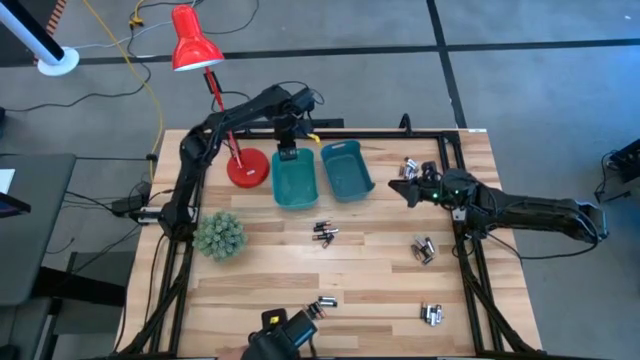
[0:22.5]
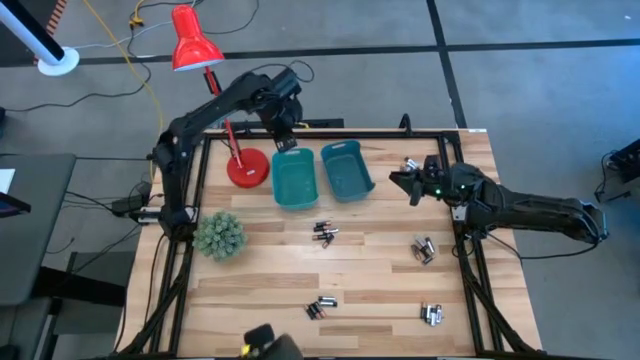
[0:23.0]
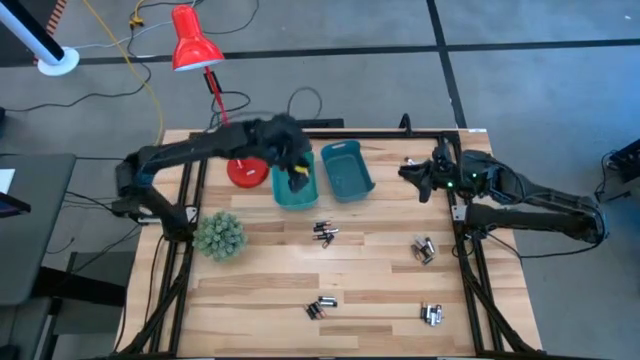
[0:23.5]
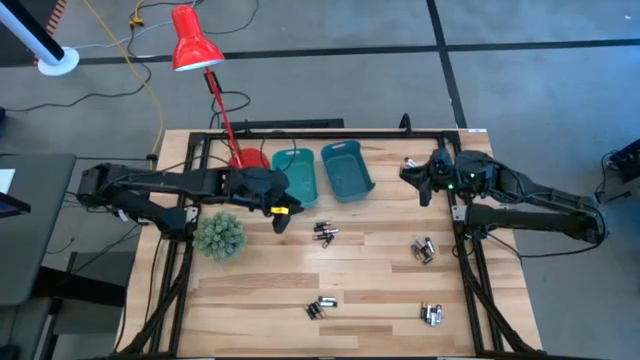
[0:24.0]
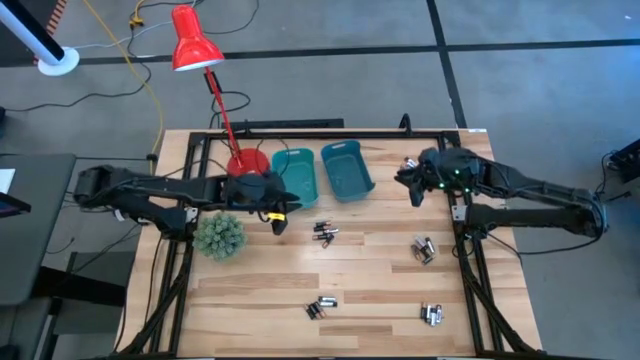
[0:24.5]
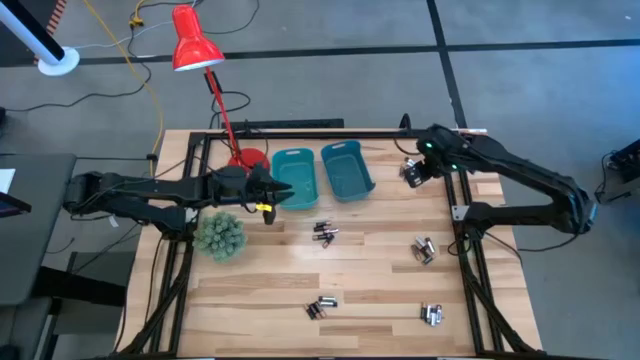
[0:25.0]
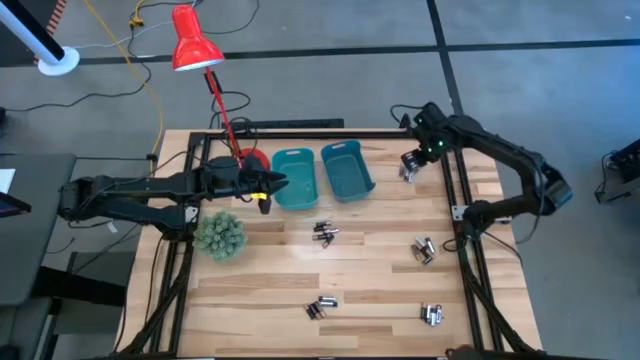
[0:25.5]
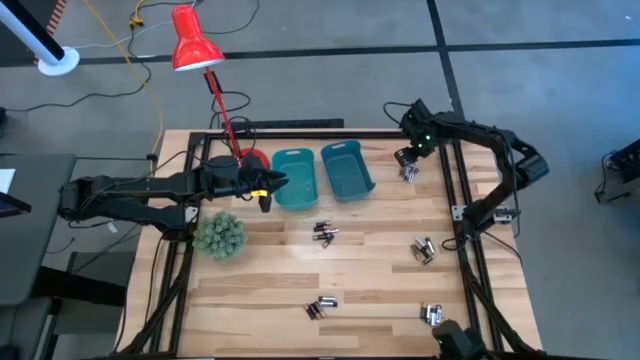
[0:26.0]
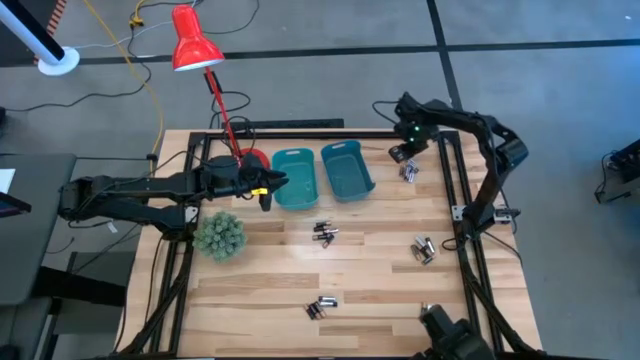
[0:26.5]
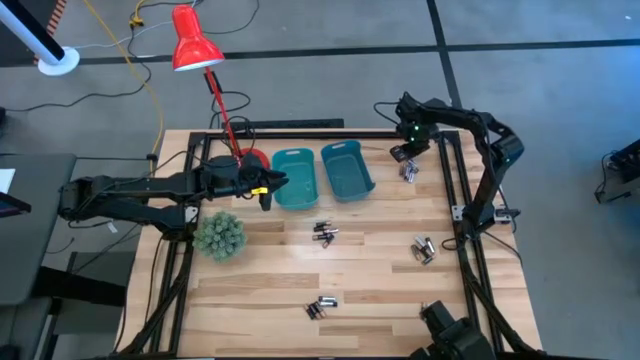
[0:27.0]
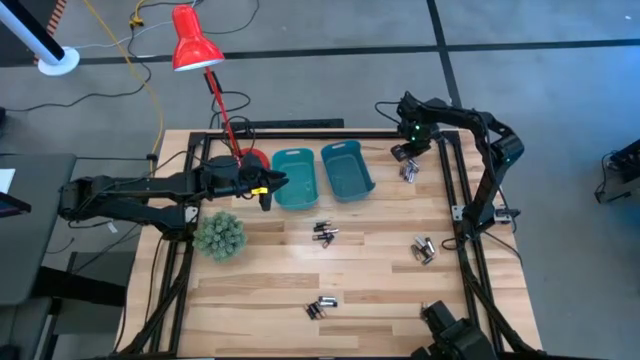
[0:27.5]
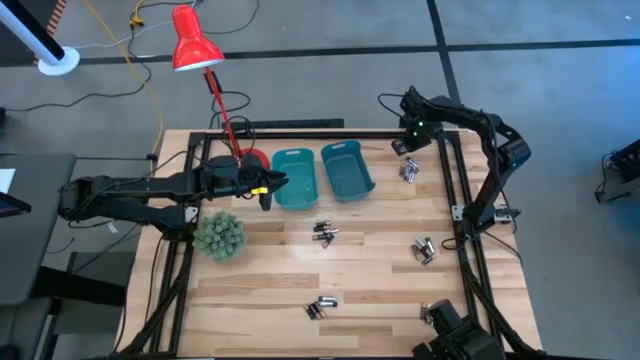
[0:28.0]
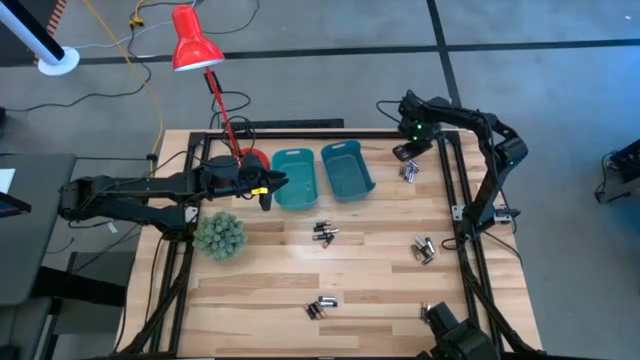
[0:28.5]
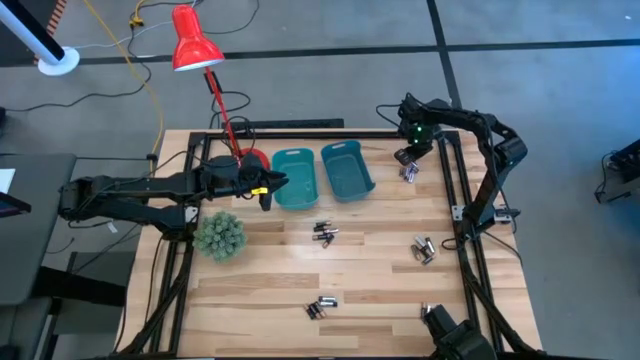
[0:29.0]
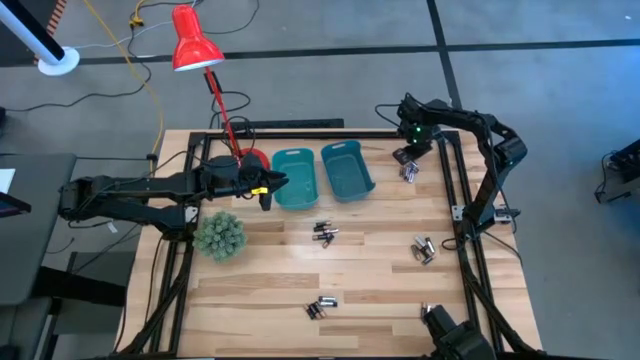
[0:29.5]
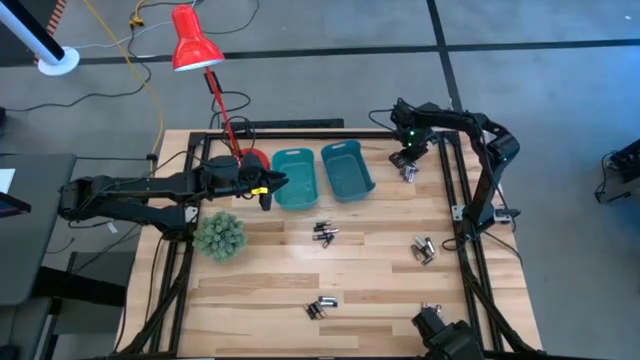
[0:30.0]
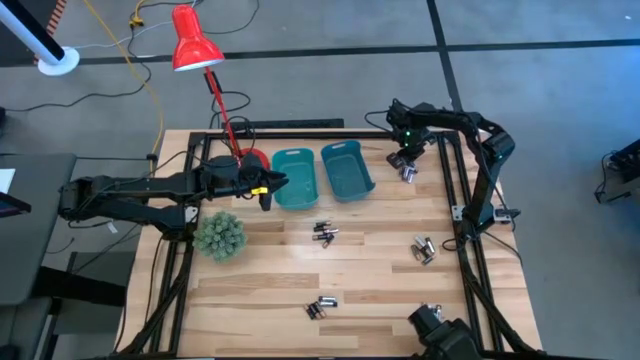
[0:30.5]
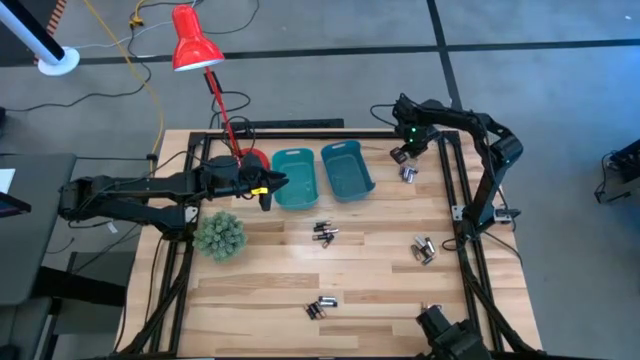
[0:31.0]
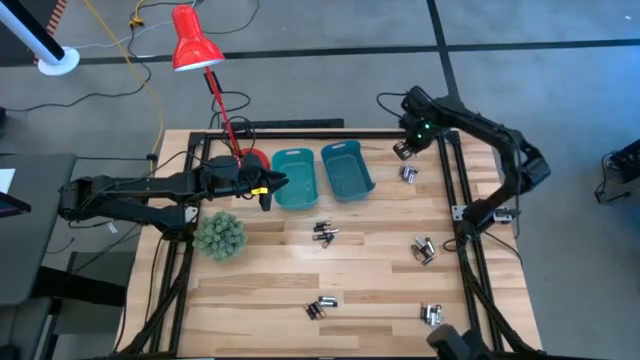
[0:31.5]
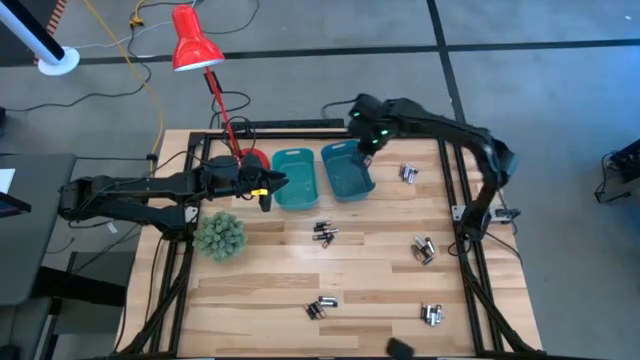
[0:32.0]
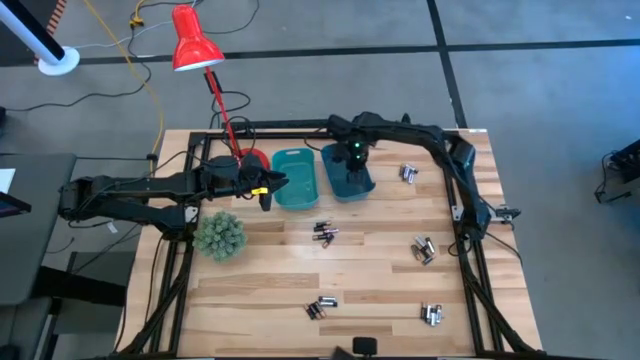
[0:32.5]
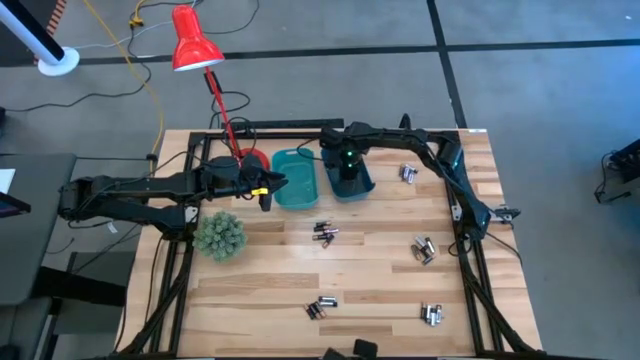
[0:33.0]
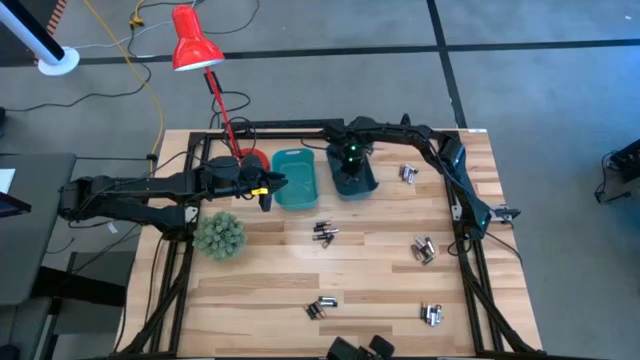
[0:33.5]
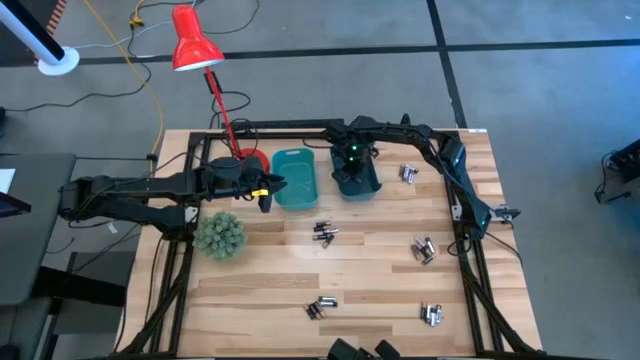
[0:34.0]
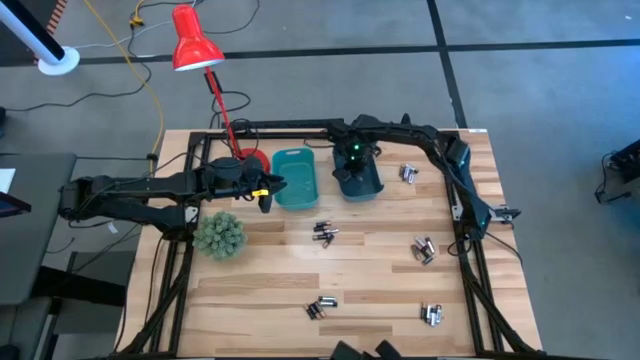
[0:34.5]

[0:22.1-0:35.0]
Task: Sort batteries
Put the black and silver battery into the blue bin

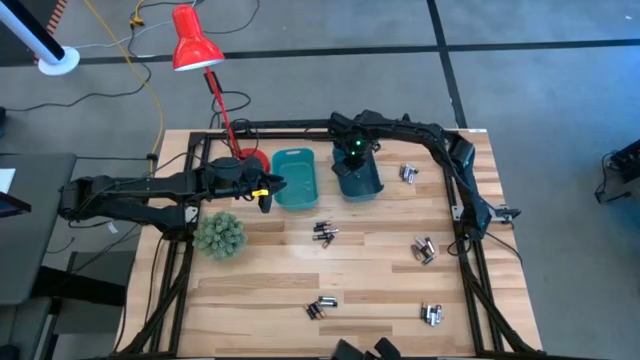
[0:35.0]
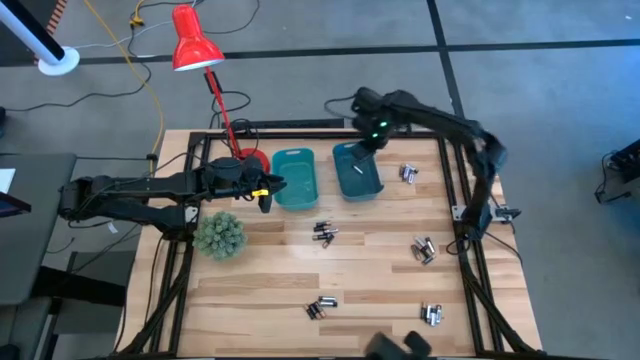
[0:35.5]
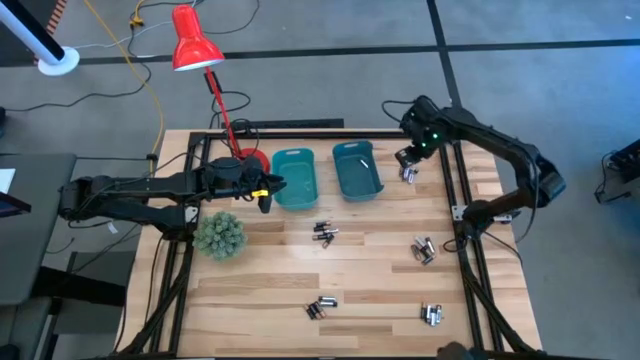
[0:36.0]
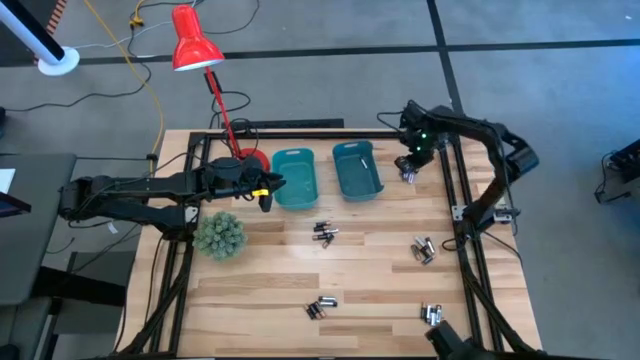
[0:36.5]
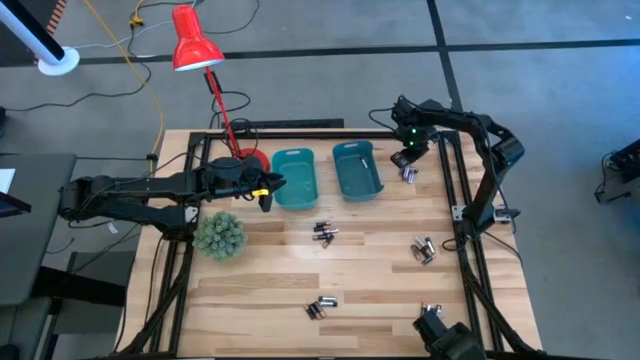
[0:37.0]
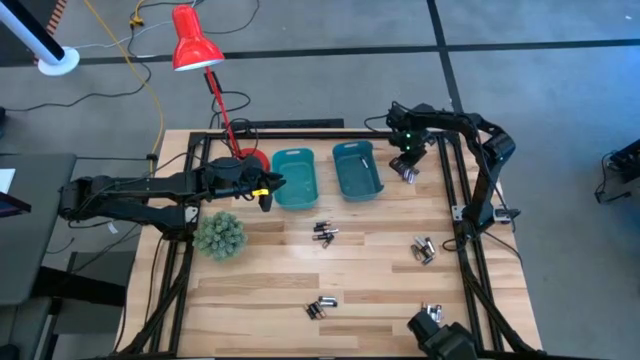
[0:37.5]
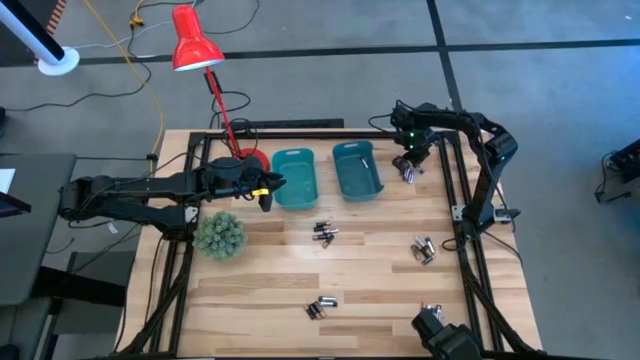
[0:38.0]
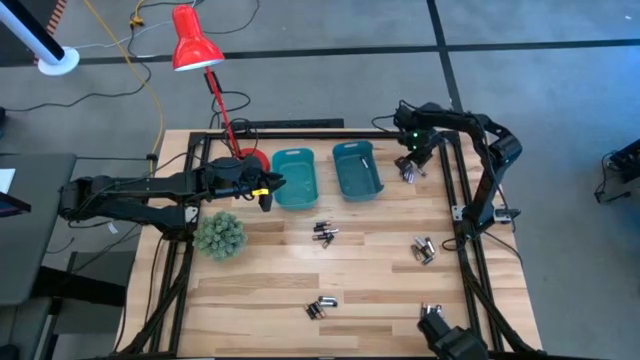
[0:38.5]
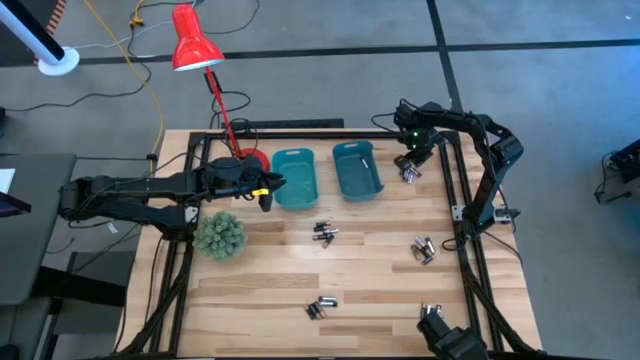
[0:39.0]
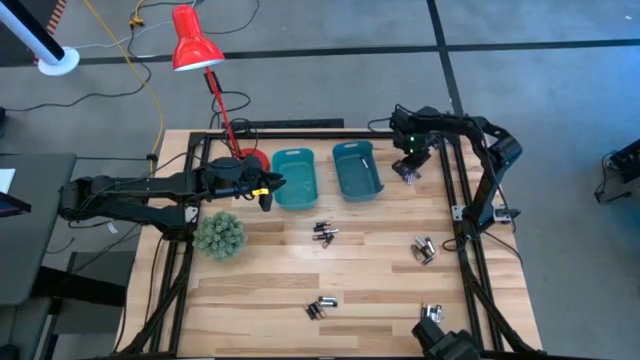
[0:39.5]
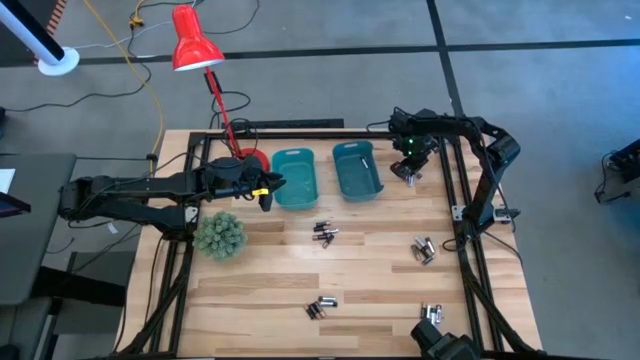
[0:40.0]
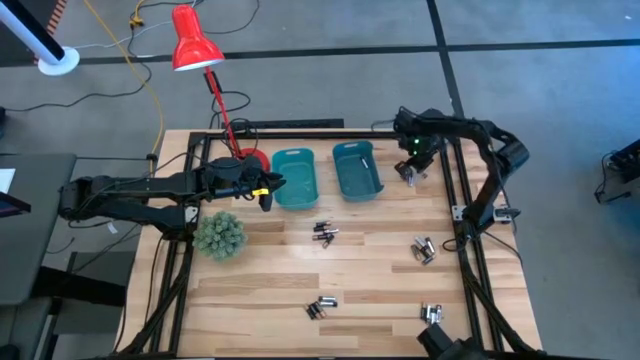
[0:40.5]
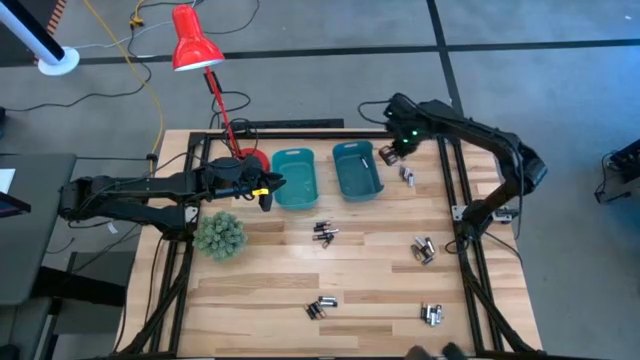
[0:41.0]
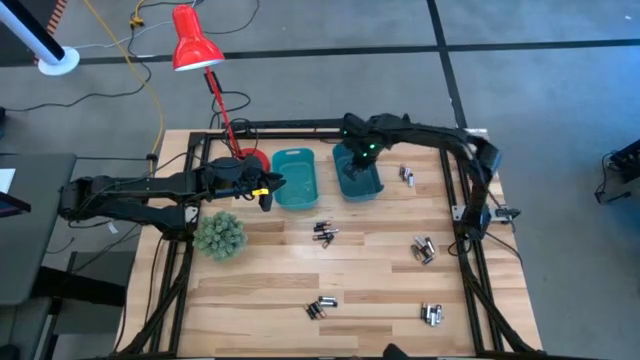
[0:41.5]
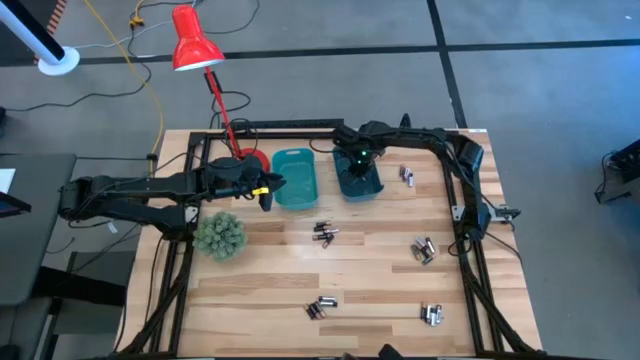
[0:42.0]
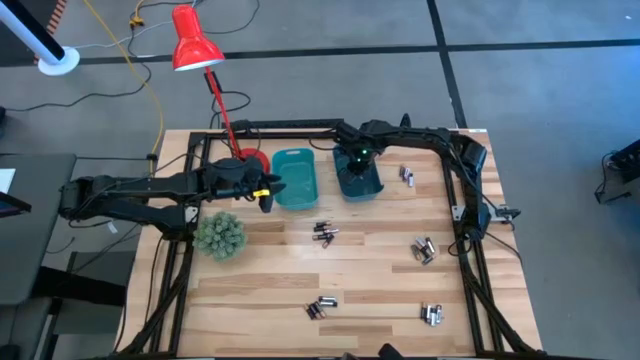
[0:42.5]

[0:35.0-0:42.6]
Put the silver battery into the blue bin

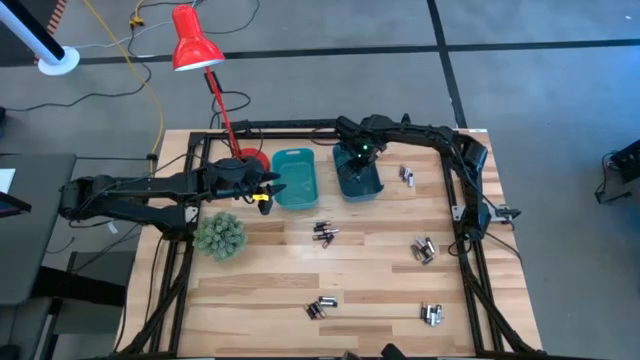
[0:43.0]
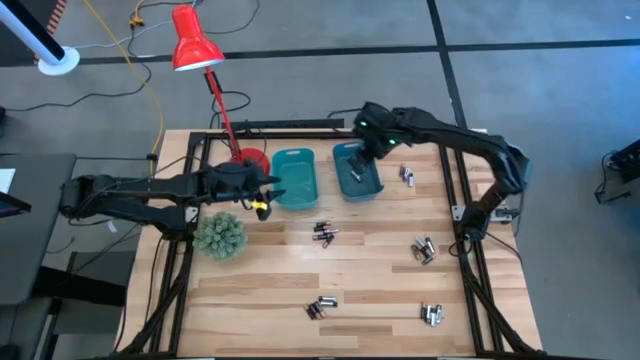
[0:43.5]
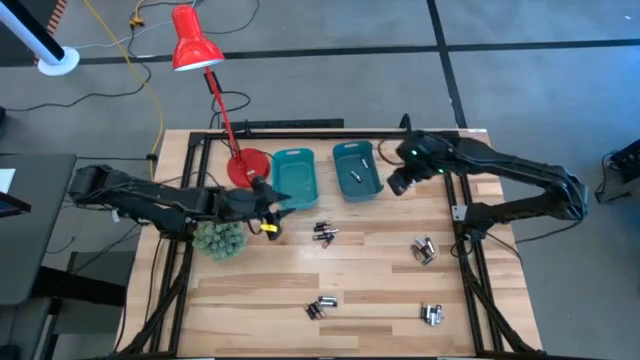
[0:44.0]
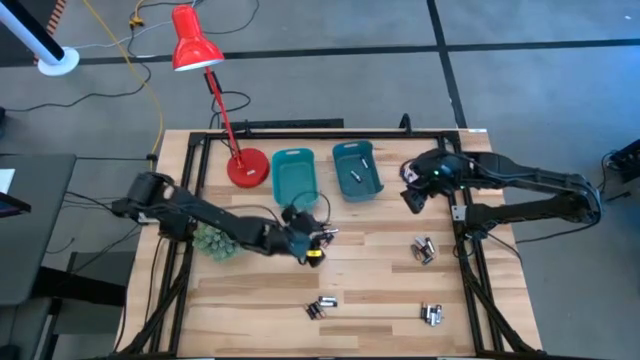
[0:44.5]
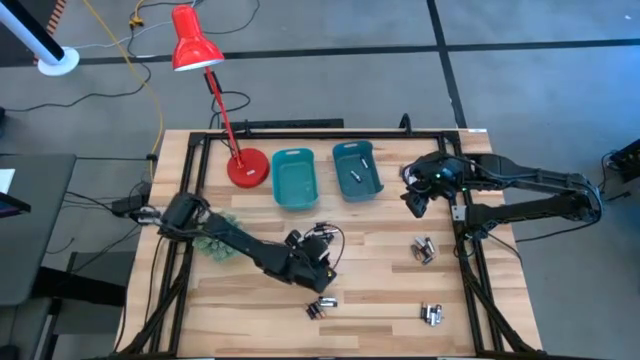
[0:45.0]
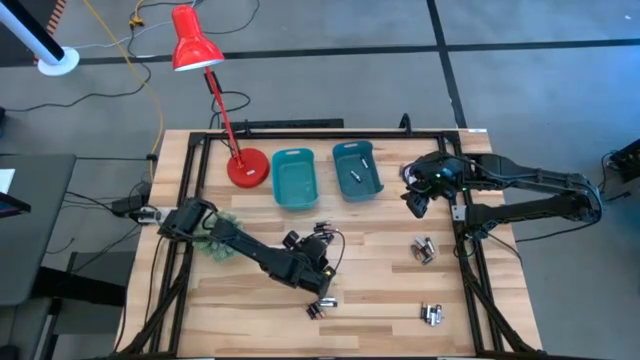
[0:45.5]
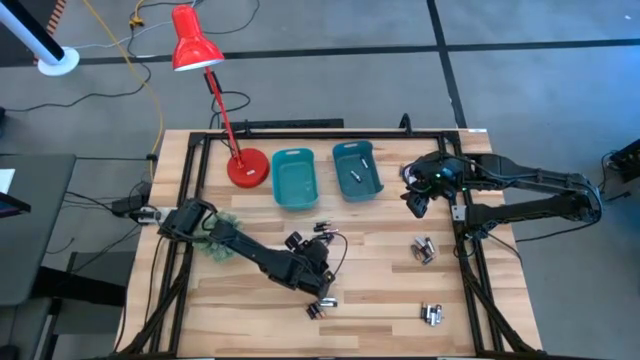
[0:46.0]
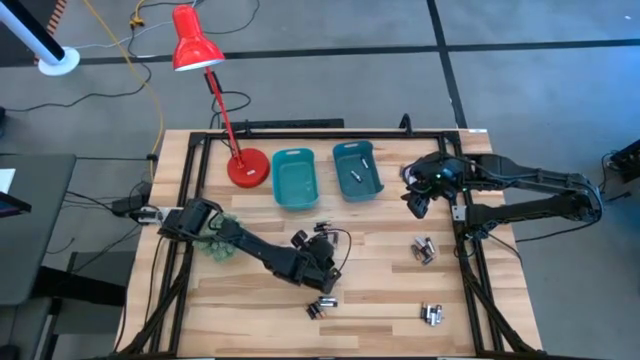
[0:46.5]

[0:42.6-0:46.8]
Put the black battery into the green bin
